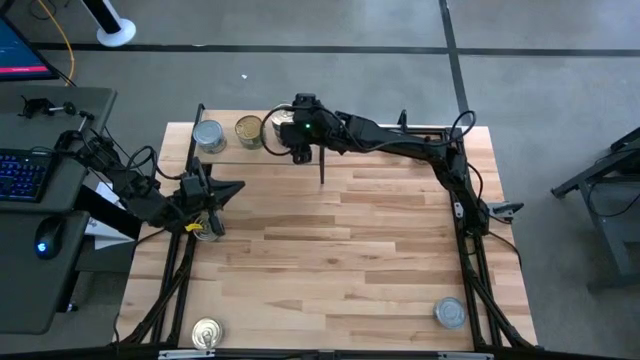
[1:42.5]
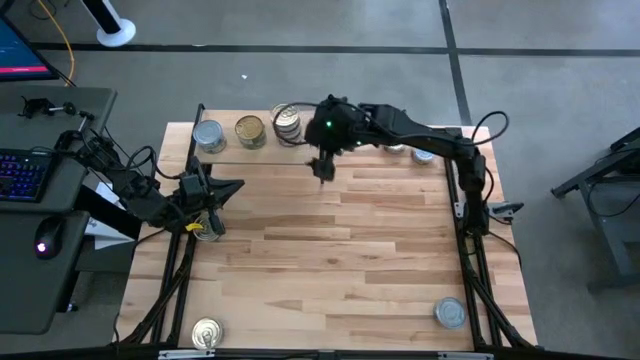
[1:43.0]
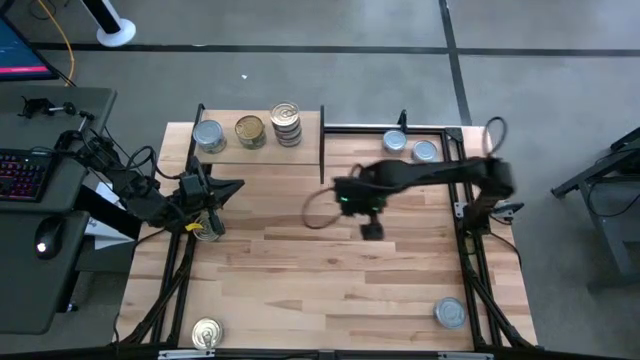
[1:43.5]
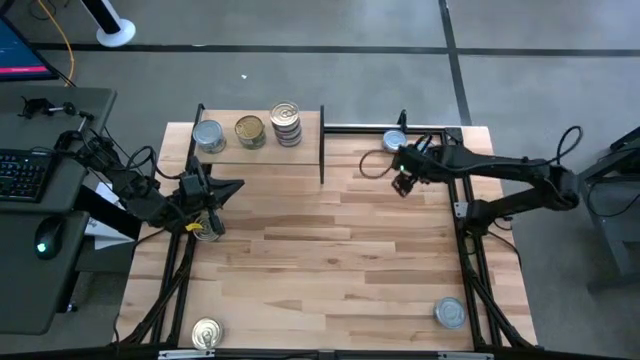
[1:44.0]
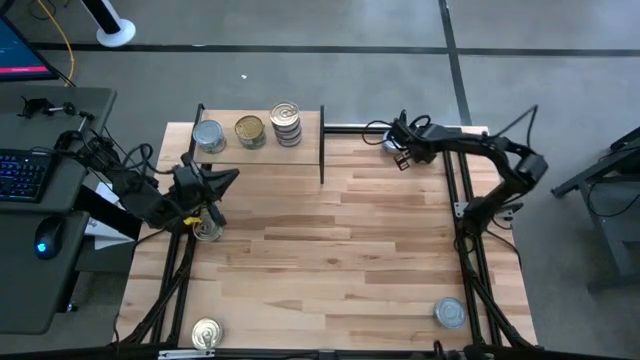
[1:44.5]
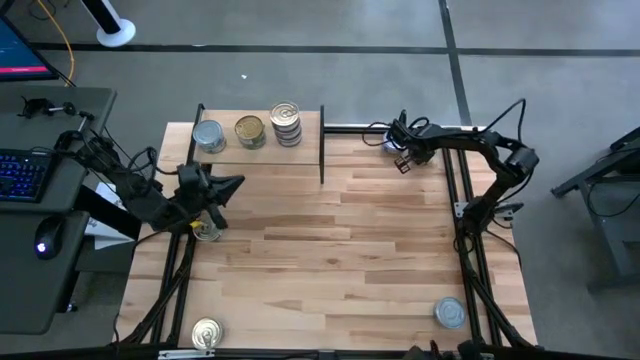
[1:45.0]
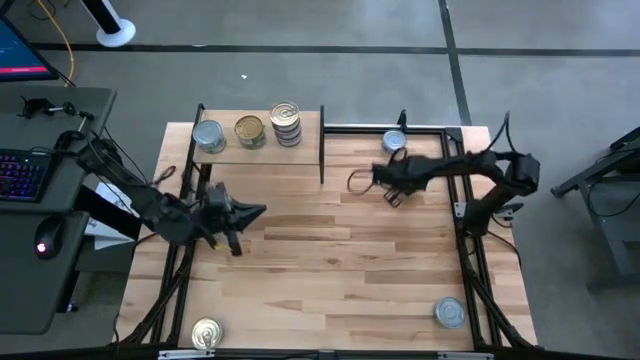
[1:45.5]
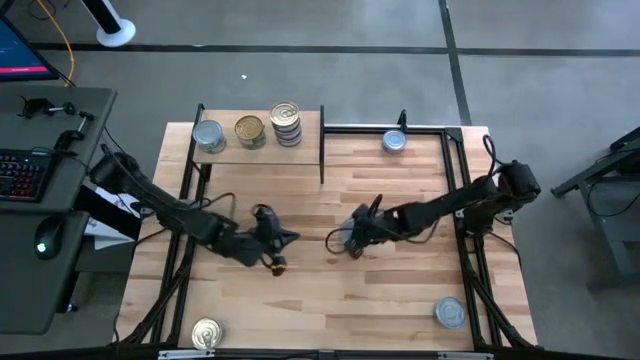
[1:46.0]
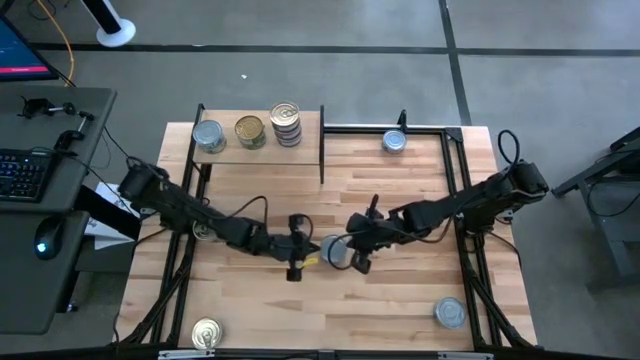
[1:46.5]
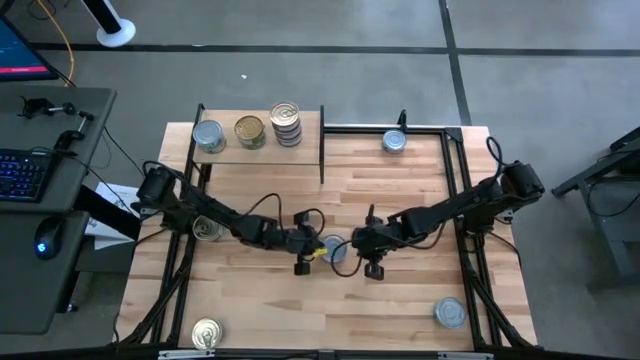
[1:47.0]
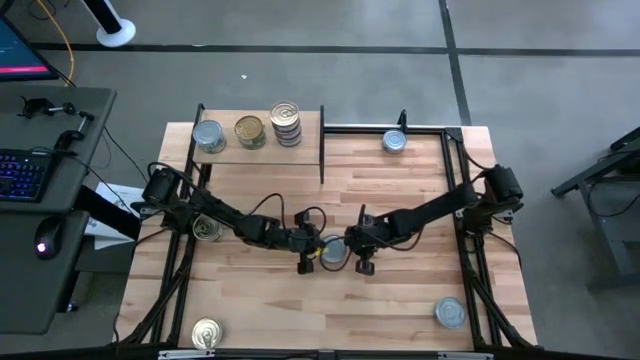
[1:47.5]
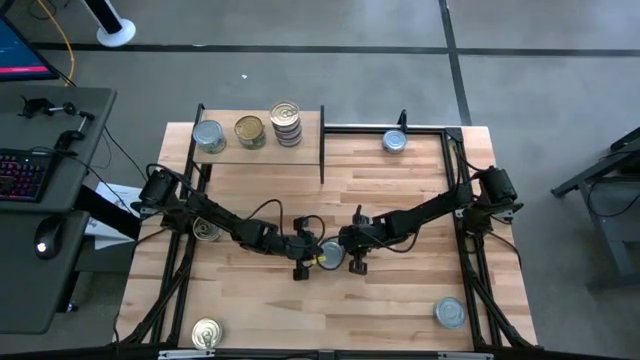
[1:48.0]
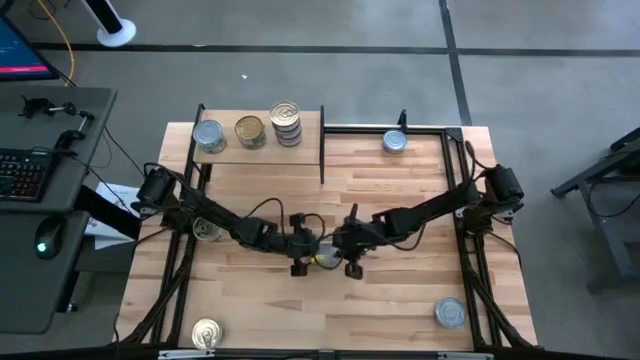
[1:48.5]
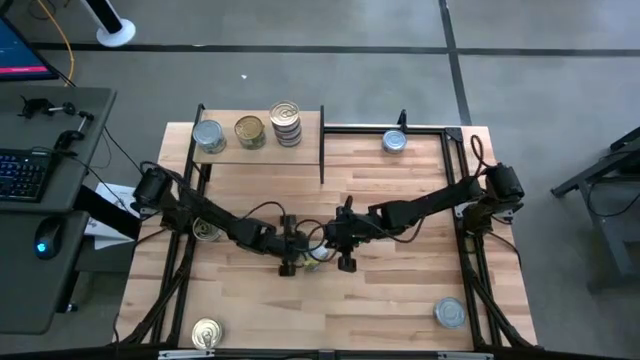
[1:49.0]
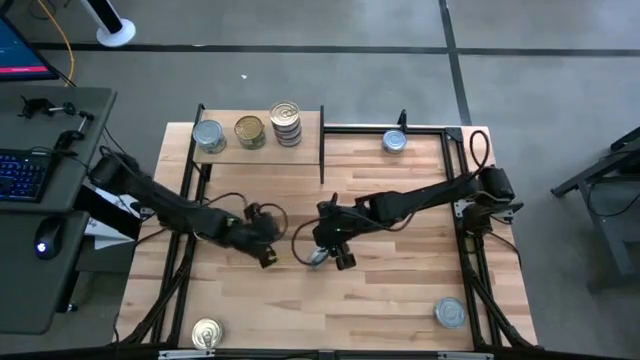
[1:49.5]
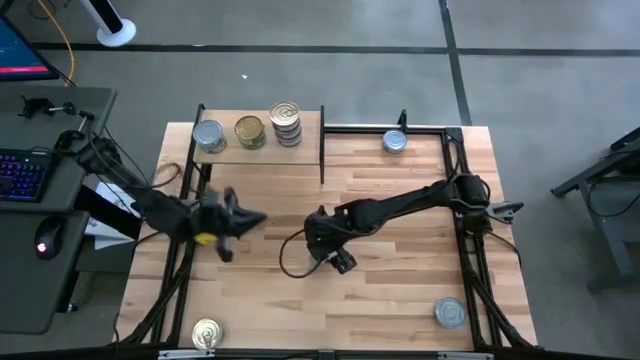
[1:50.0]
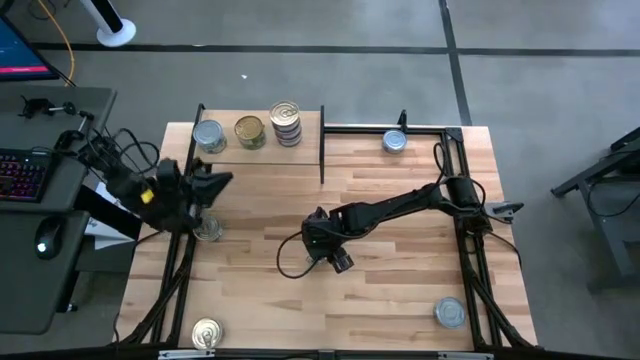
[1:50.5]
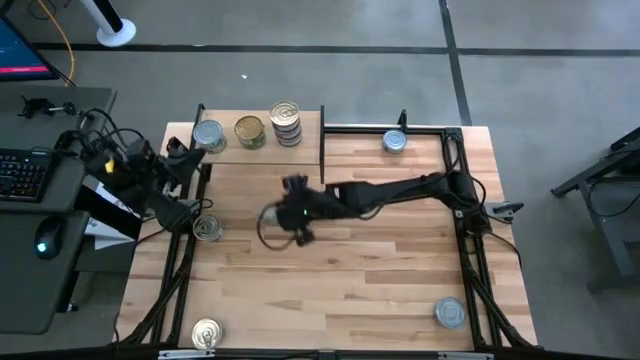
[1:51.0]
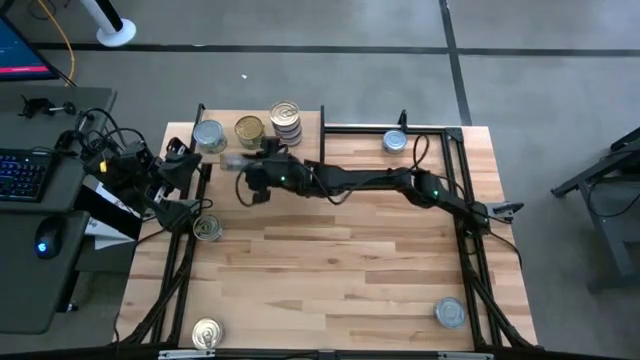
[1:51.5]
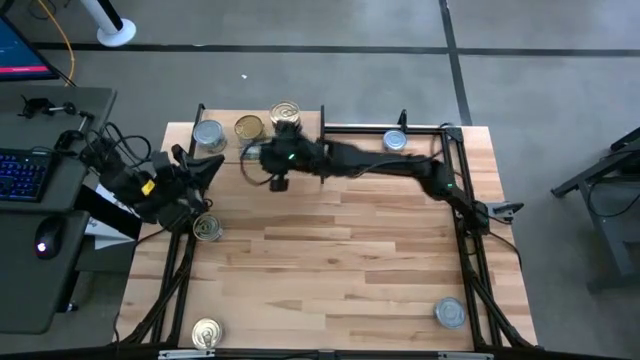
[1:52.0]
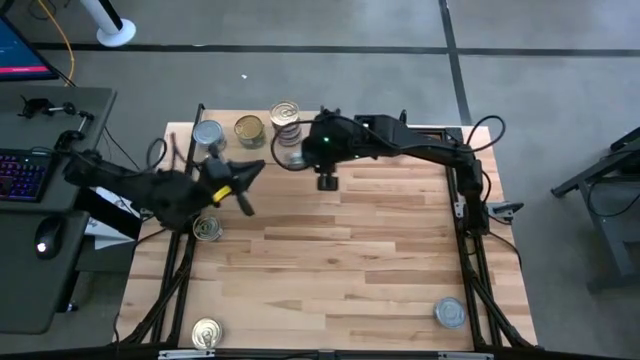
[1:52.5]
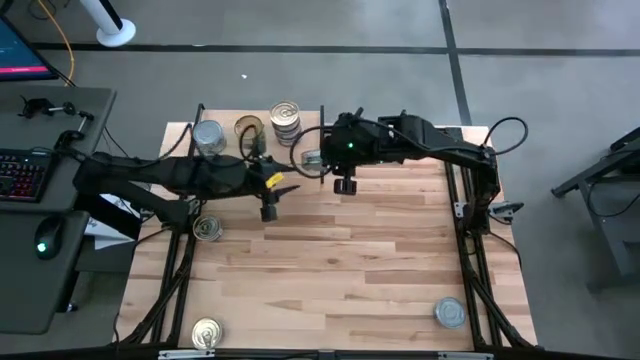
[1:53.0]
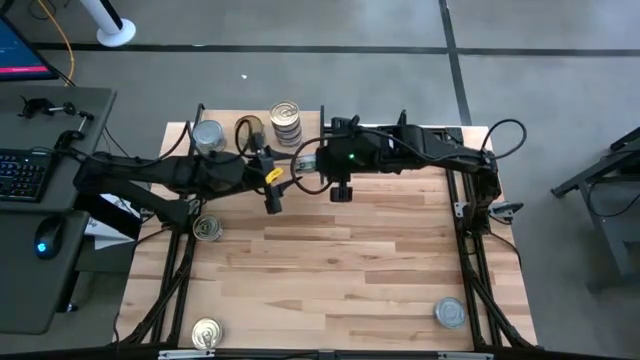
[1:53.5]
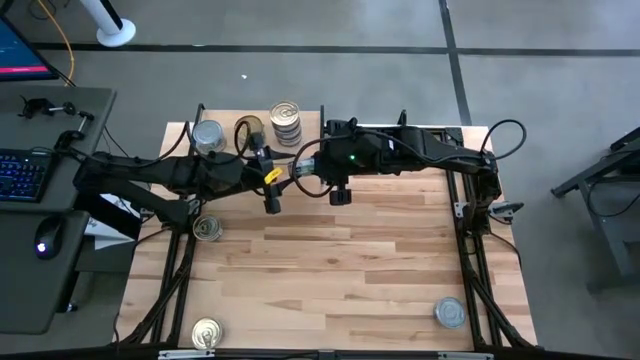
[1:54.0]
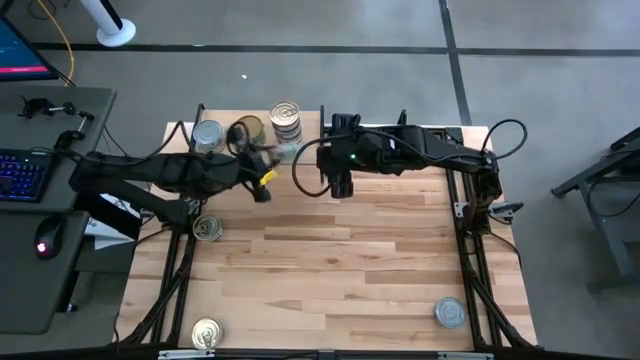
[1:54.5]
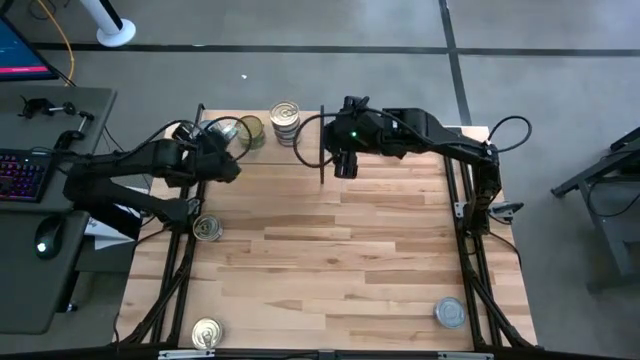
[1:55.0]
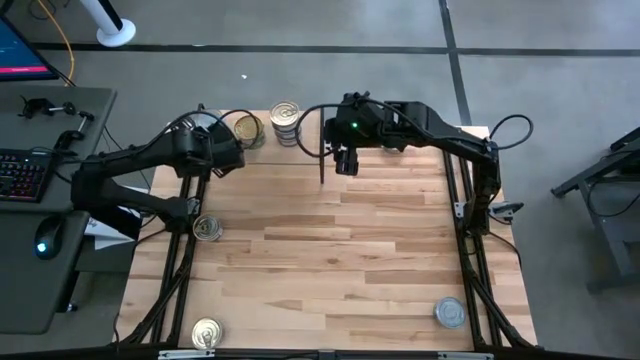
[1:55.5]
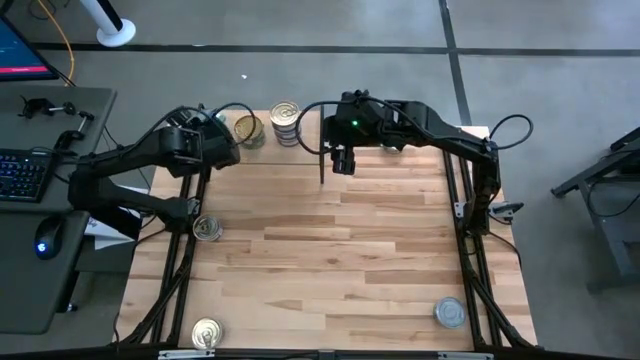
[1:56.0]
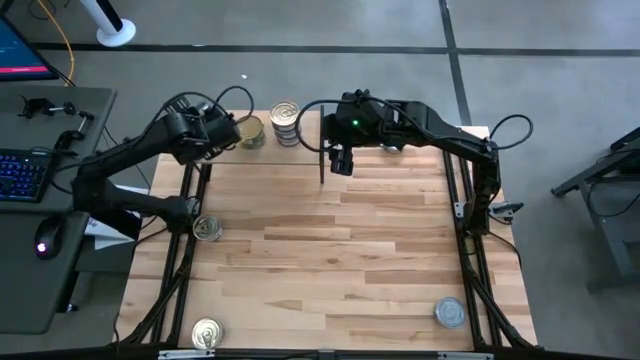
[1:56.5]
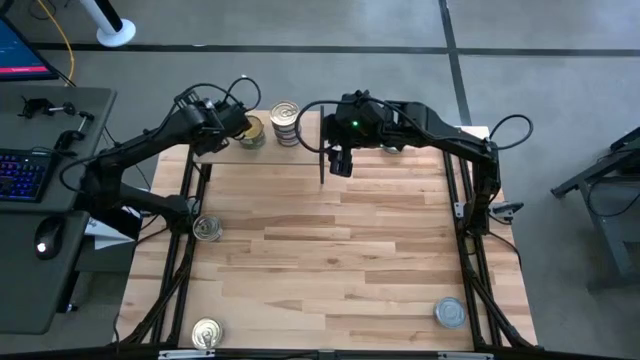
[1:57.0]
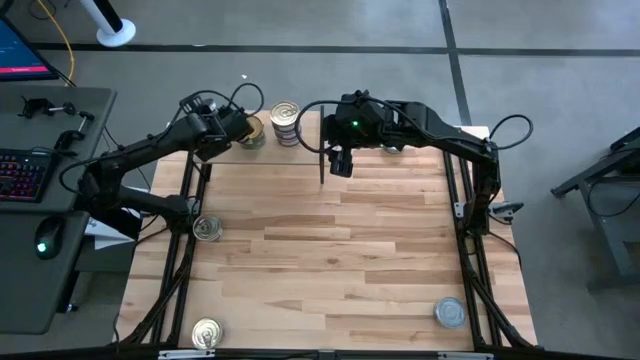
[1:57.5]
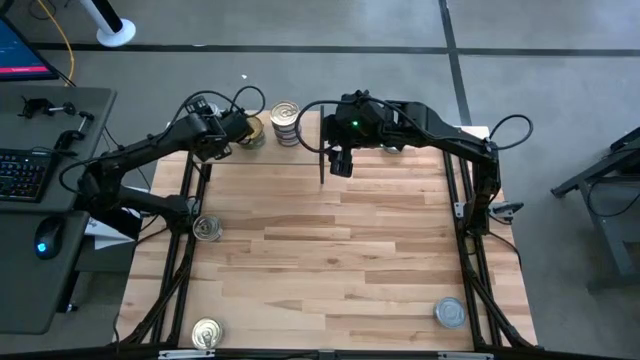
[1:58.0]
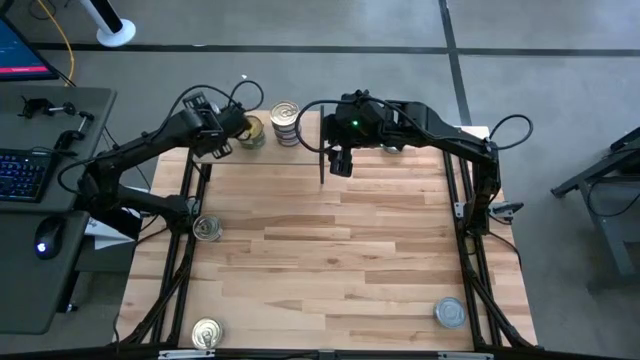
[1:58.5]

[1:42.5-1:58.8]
Task: Stack canned seafood by type on shelf
Stack the green-white tuna can on top of the green-white tuna cans on the shelf

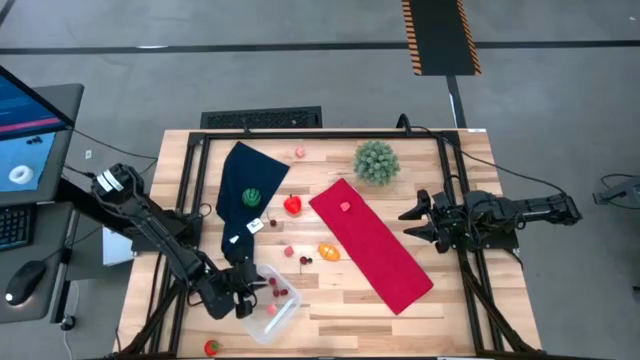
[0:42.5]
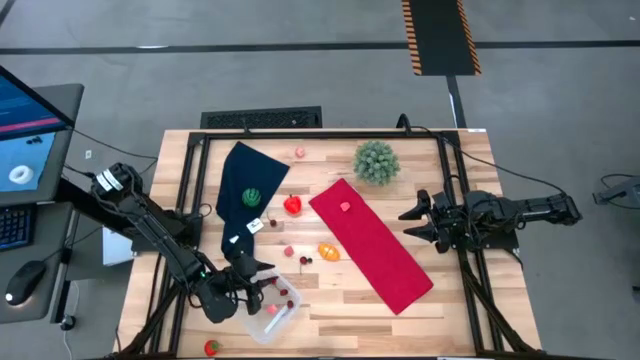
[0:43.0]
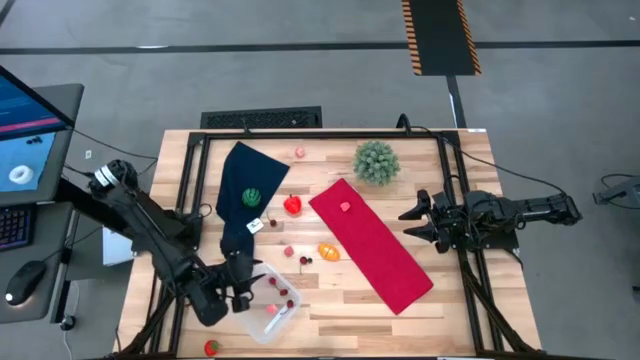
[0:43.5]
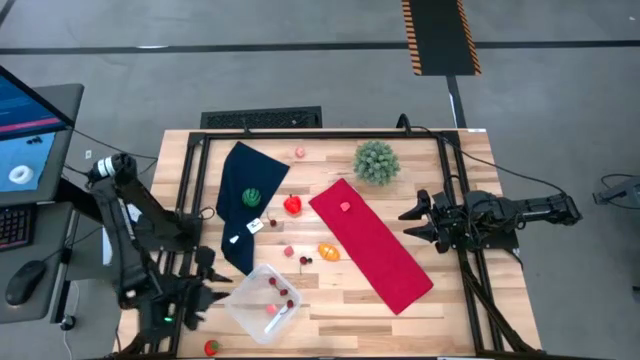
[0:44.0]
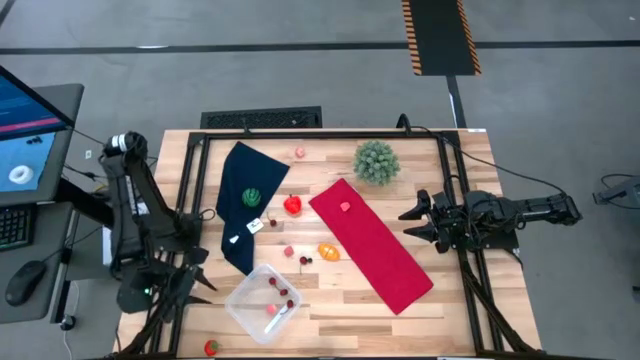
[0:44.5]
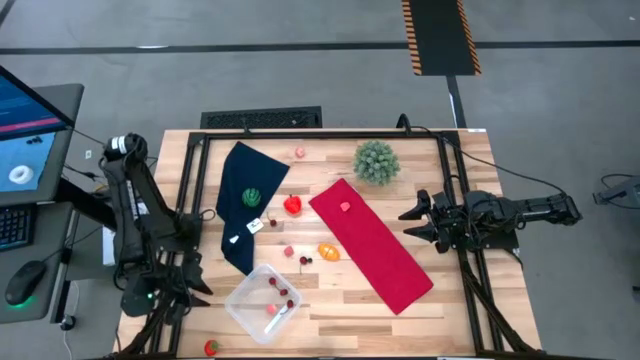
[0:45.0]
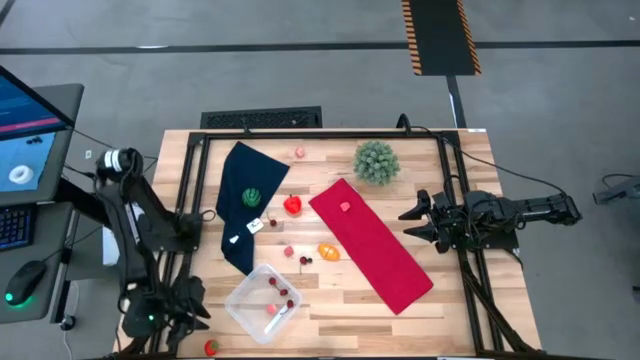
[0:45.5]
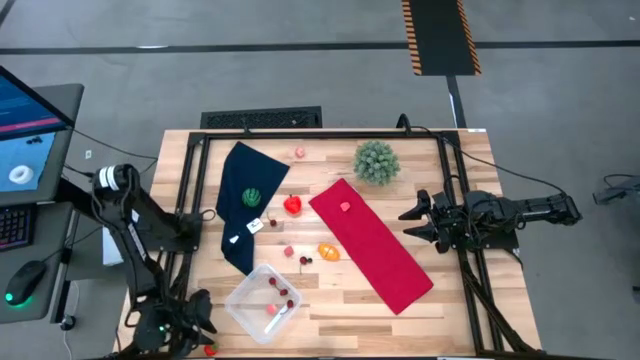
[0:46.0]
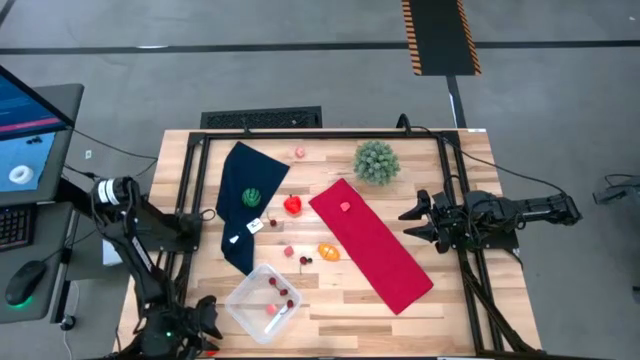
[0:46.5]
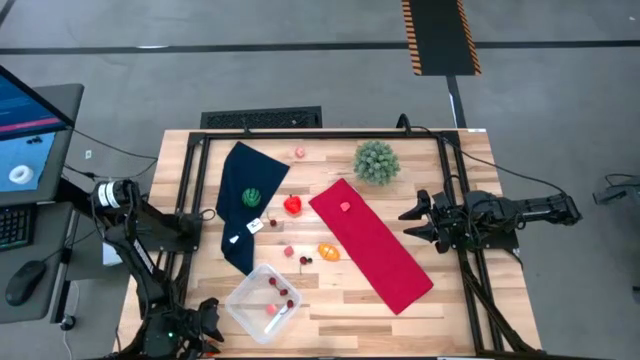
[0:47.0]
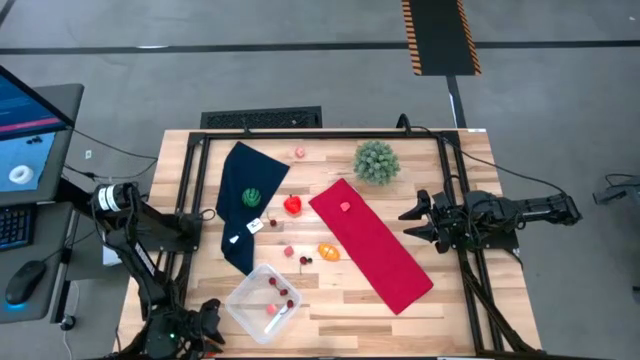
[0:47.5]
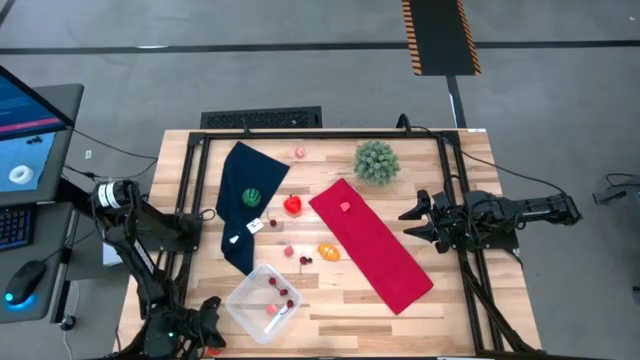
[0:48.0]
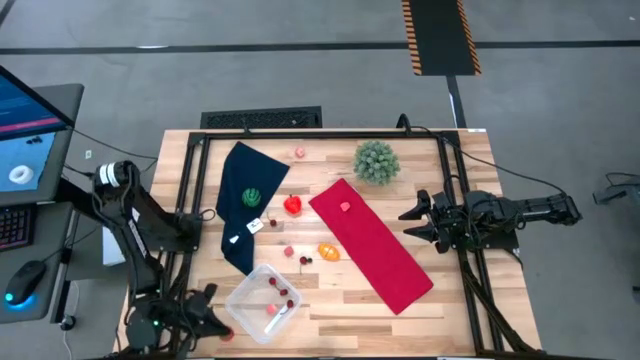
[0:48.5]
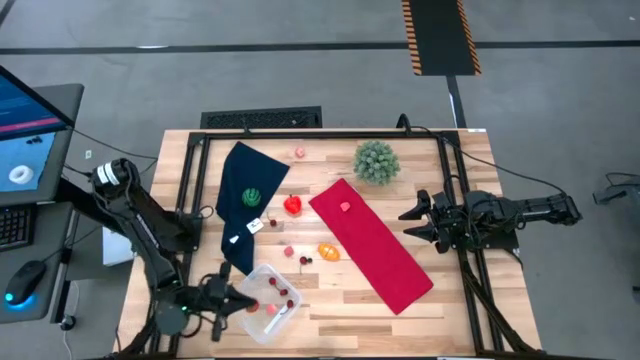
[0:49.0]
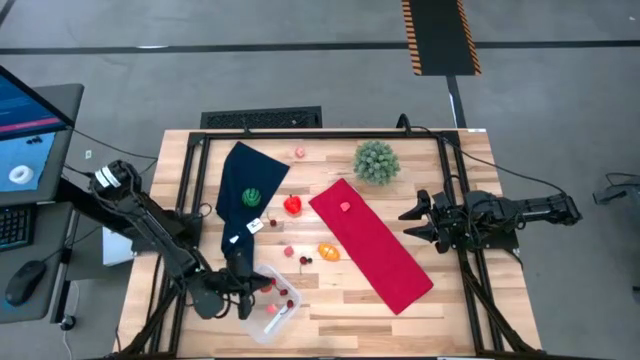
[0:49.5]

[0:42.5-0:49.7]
Task: Pick and placing Produce into tupperware
Put the strawberry into the transparent bin
